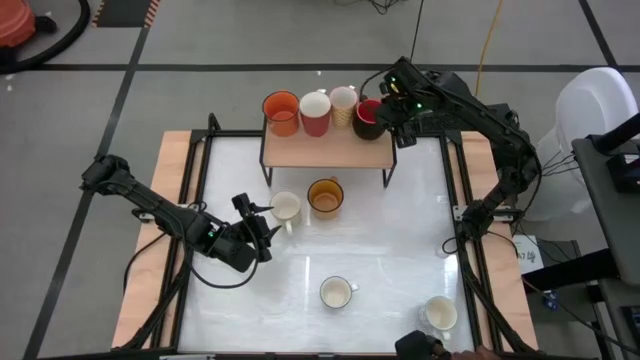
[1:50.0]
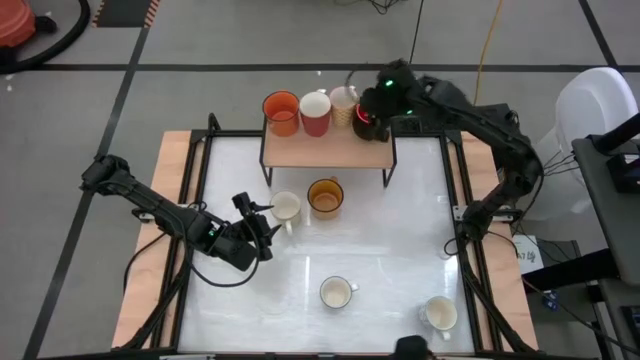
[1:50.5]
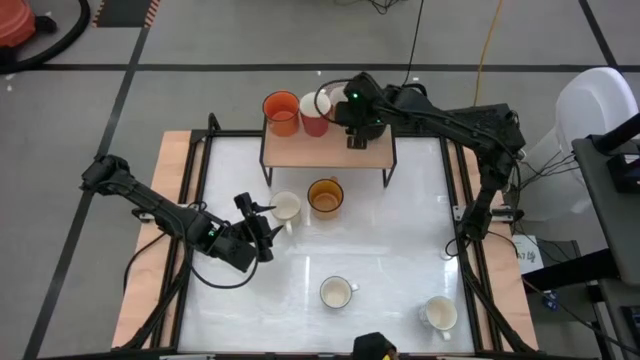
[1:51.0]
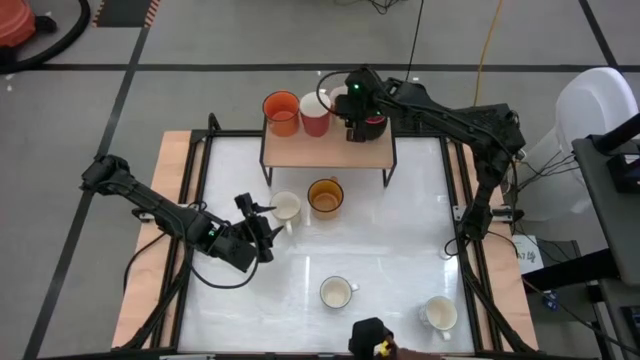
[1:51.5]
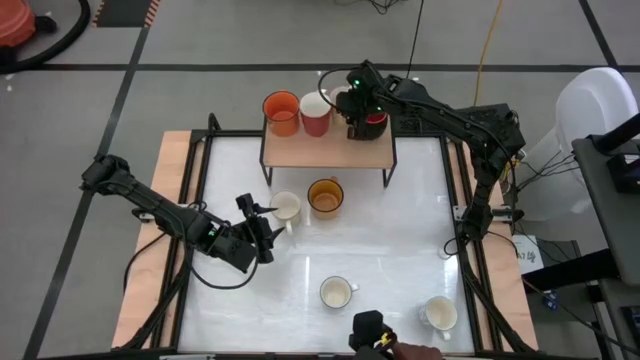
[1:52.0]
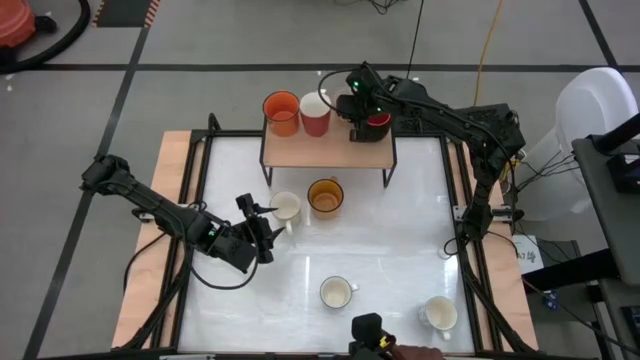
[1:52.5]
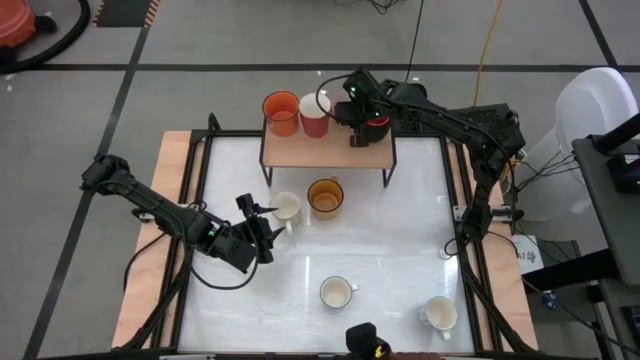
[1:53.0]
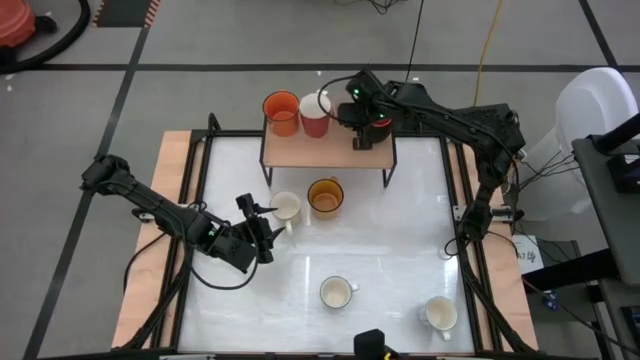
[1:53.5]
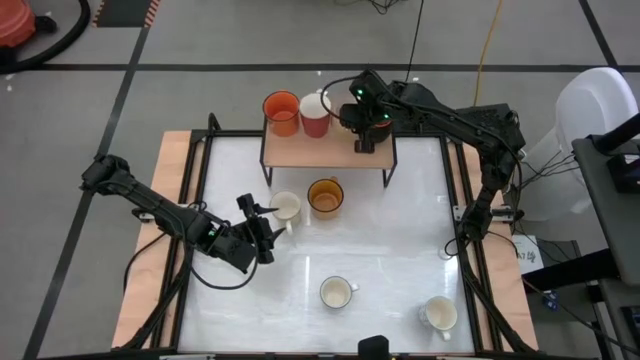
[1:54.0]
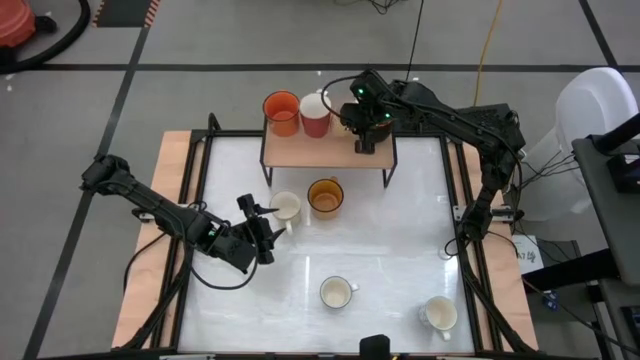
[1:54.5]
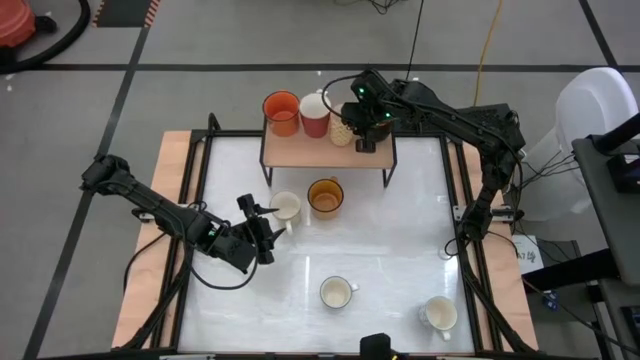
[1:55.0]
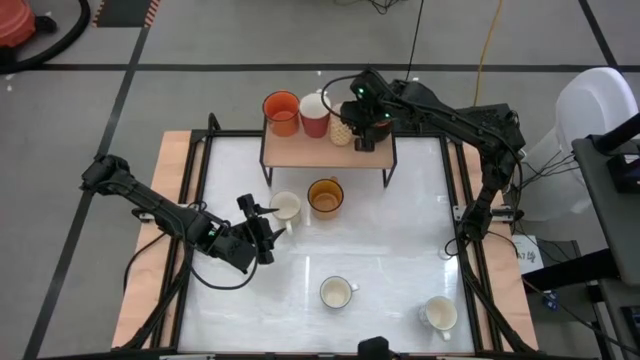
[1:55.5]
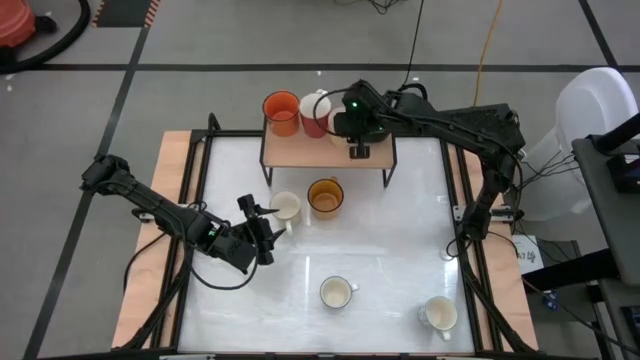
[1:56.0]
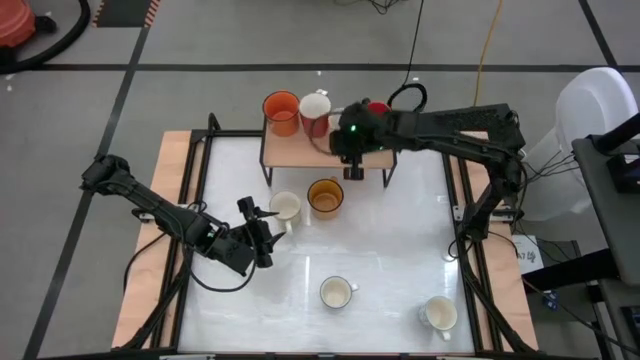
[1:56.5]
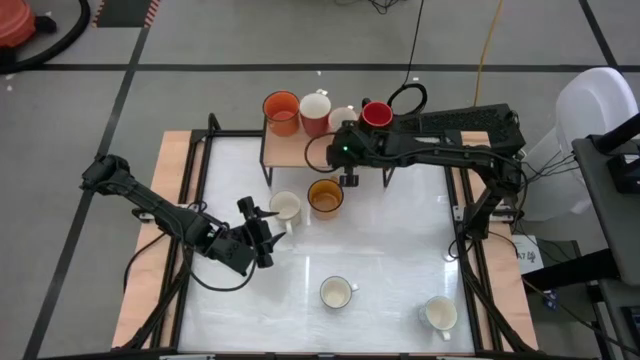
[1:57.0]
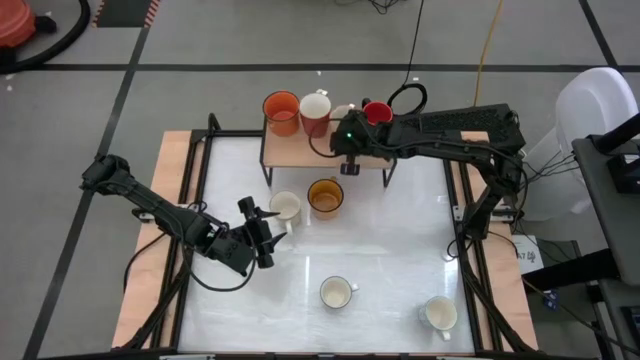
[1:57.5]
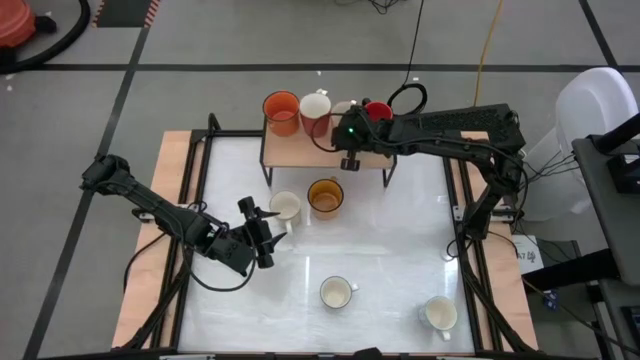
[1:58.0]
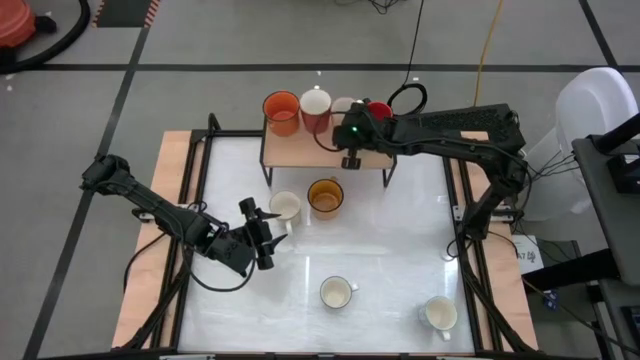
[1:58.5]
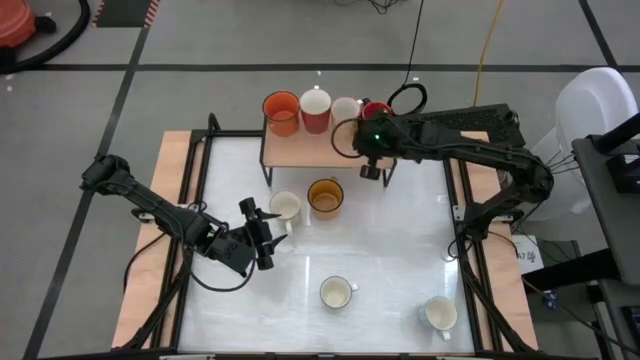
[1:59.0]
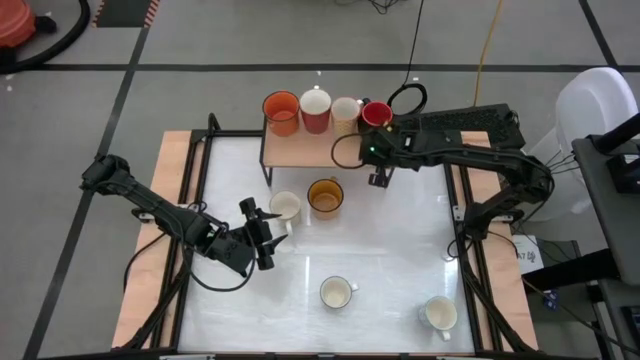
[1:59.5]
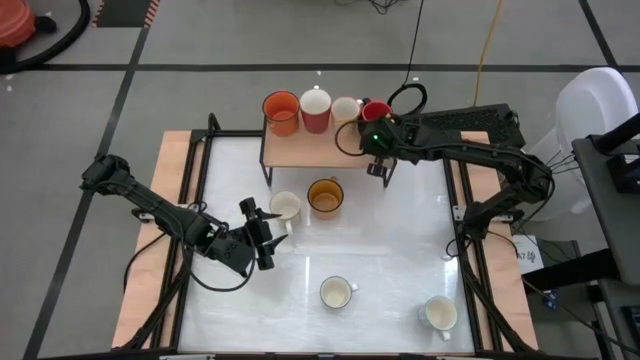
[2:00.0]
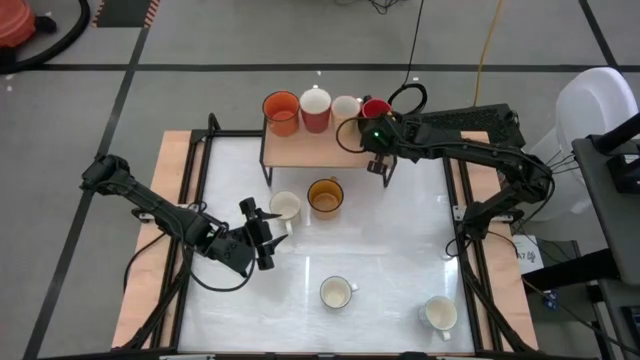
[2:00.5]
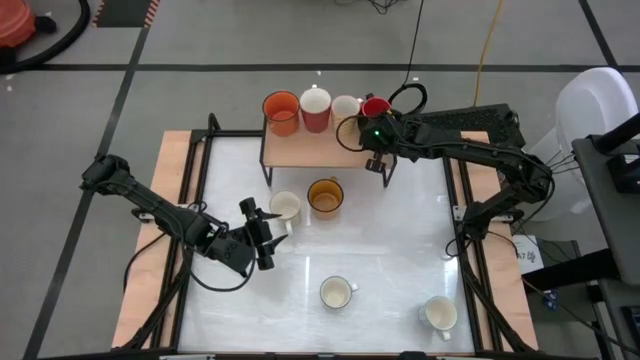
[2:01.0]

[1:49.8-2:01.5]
Task: Place coffee mugs
Adjust the mugs on the shelf

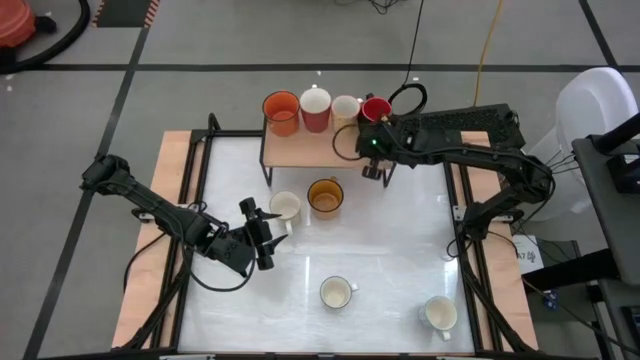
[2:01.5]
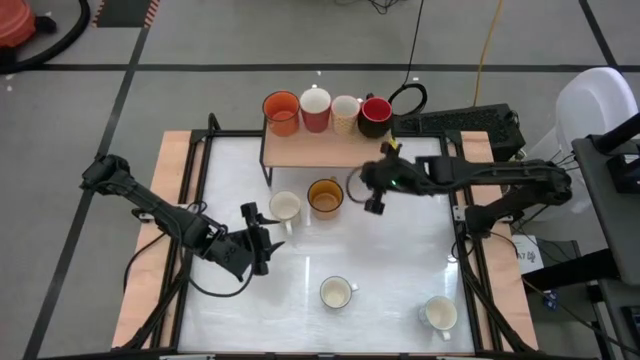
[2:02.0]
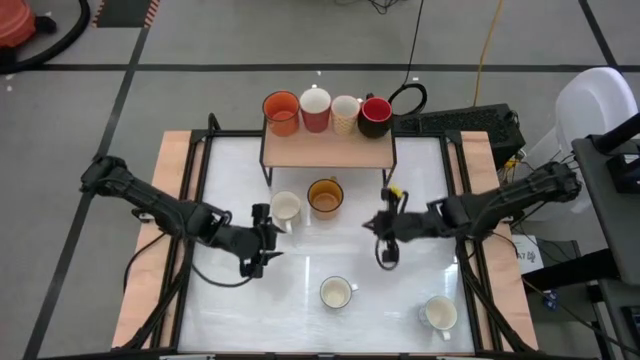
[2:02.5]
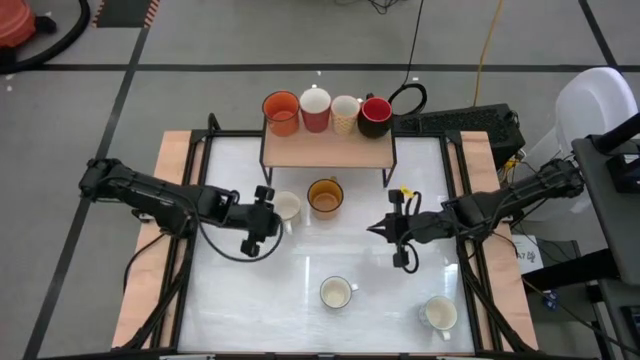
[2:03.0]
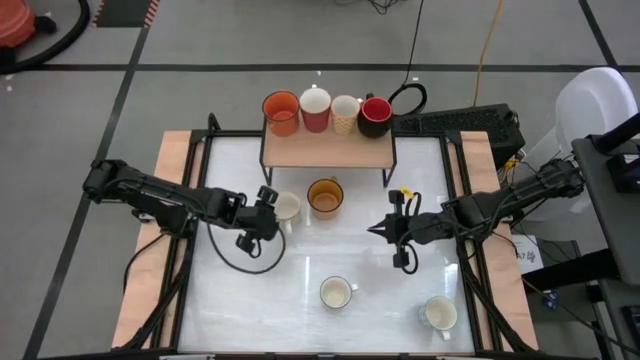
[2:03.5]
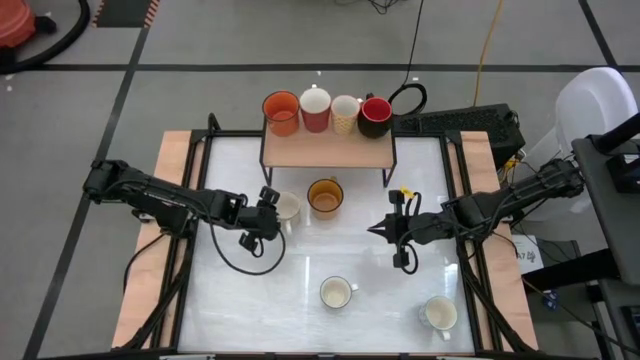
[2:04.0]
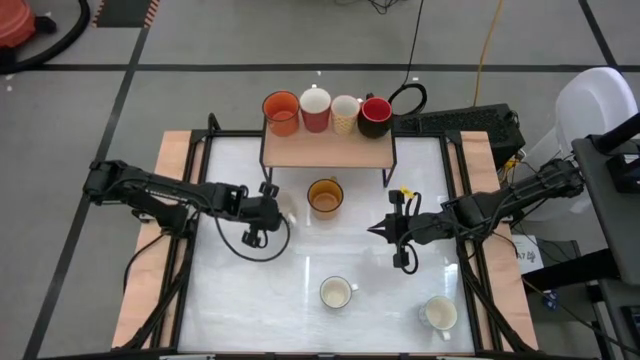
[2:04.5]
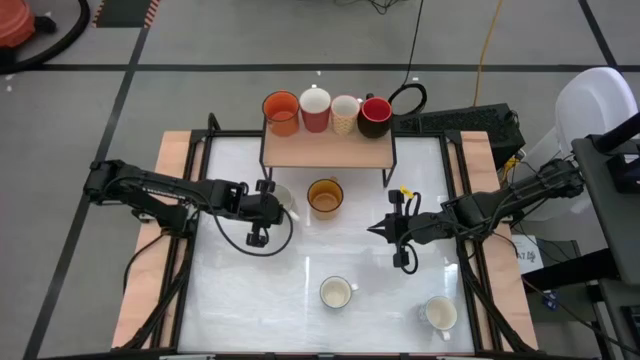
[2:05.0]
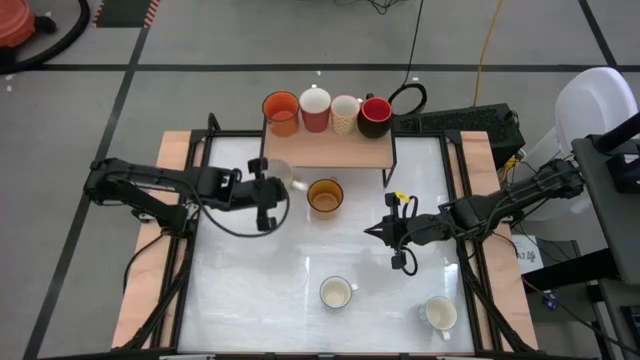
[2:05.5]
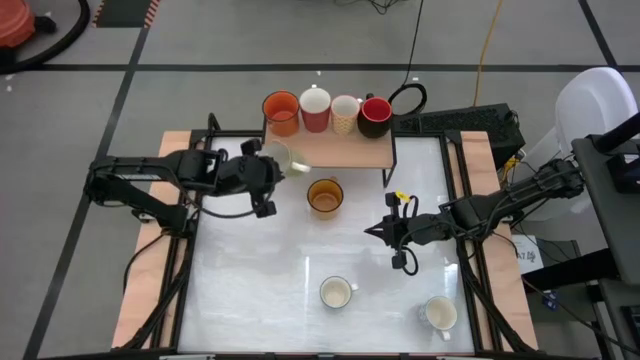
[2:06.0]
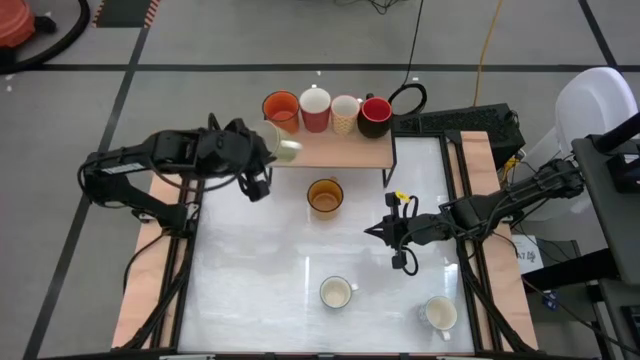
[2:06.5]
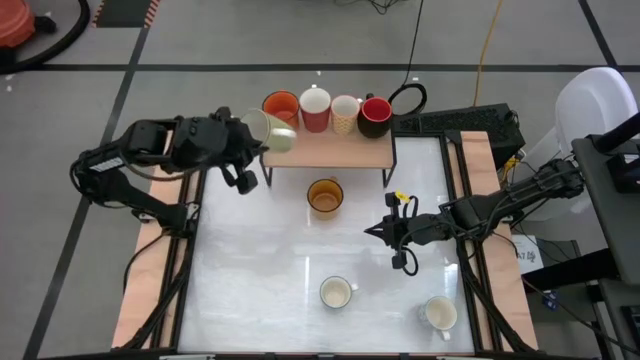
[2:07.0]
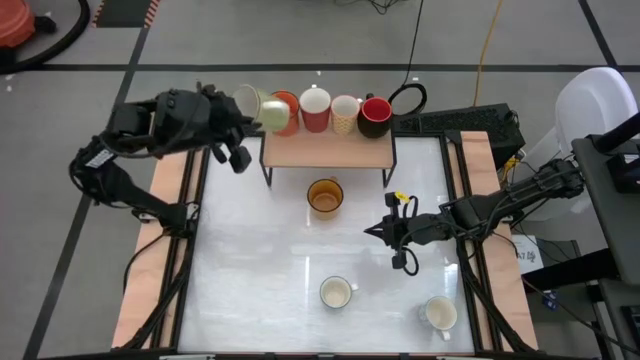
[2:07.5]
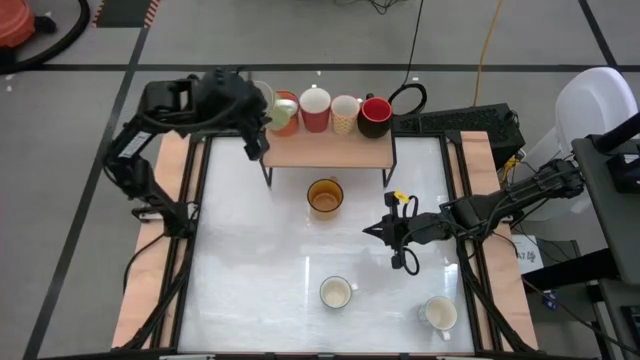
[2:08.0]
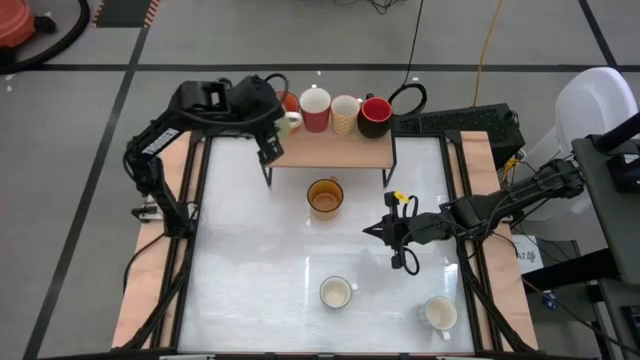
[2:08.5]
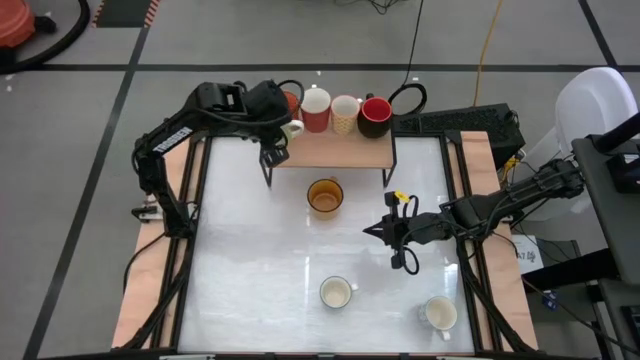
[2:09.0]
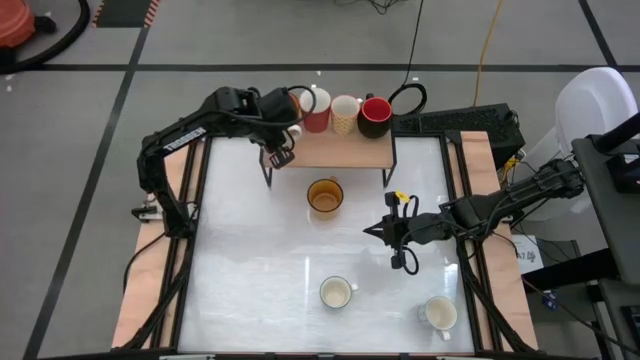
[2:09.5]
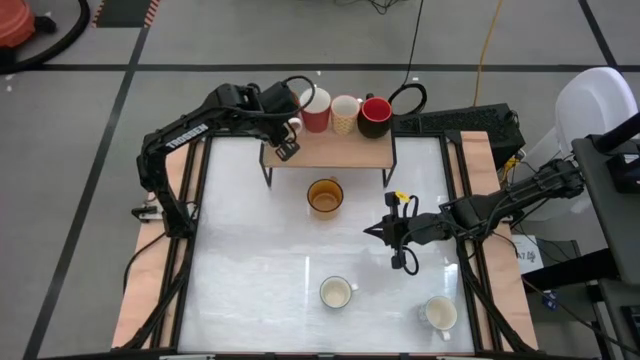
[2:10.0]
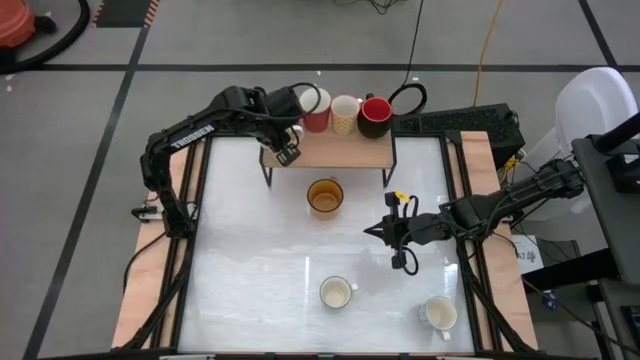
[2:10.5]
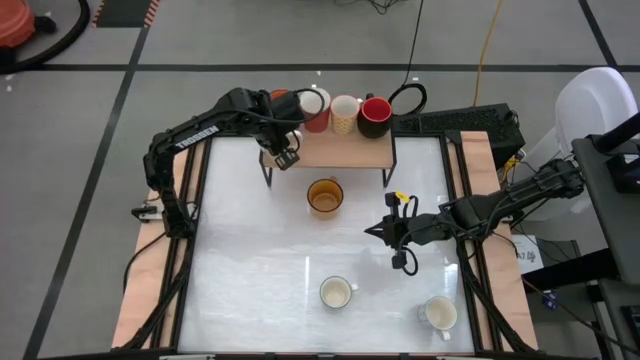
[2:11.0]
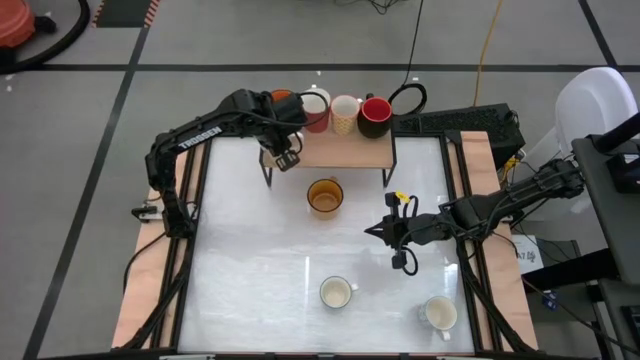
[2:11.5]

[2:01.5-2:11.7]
Put the green mug on the shelf
